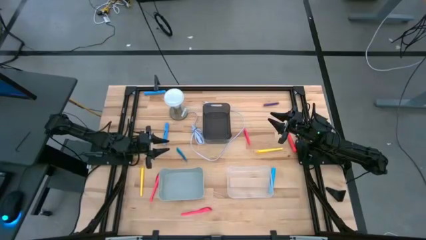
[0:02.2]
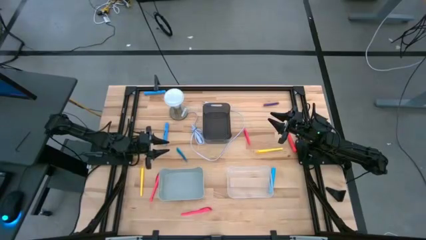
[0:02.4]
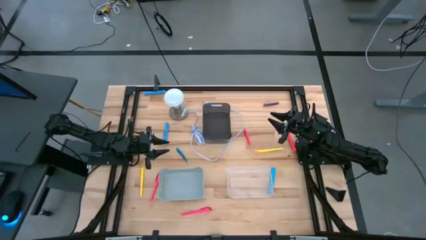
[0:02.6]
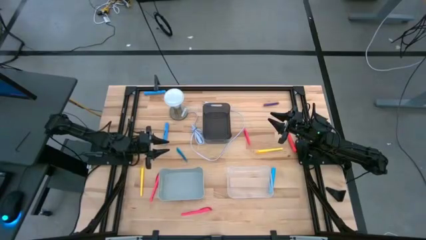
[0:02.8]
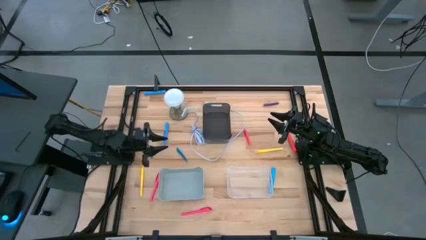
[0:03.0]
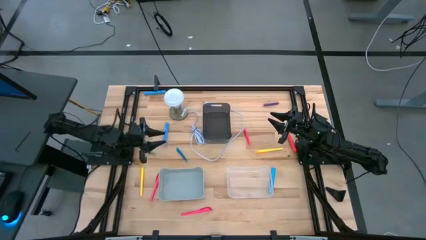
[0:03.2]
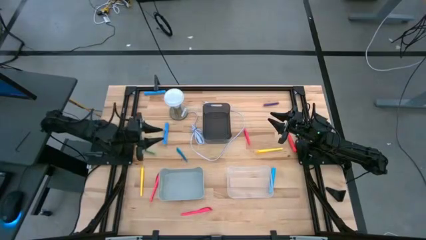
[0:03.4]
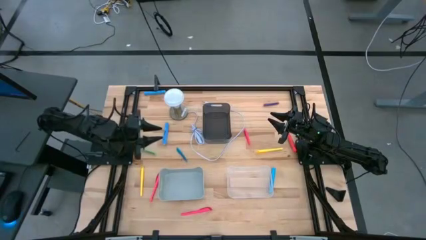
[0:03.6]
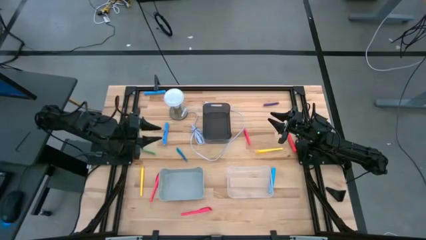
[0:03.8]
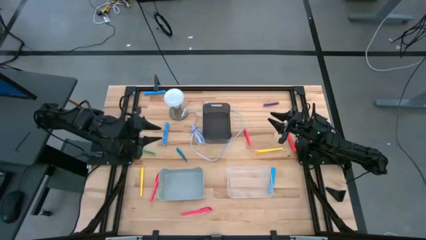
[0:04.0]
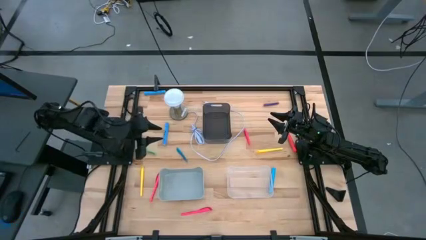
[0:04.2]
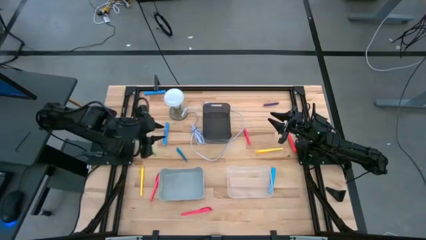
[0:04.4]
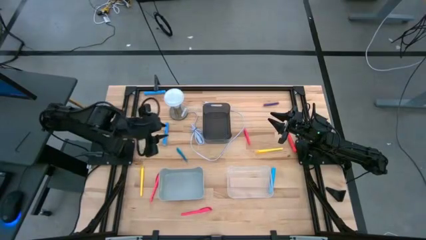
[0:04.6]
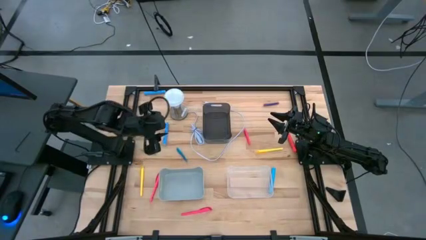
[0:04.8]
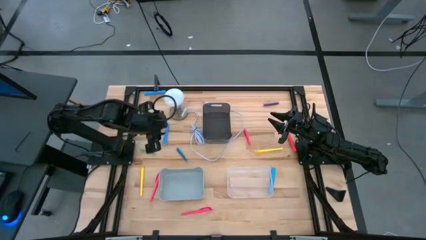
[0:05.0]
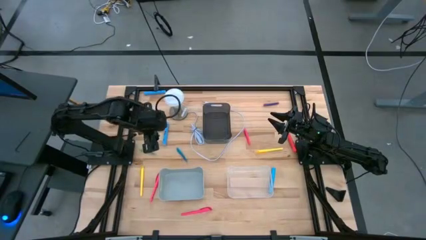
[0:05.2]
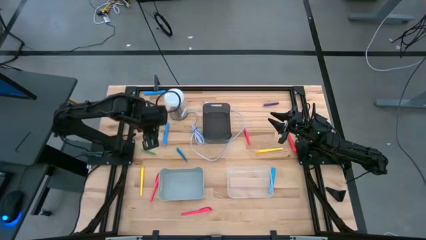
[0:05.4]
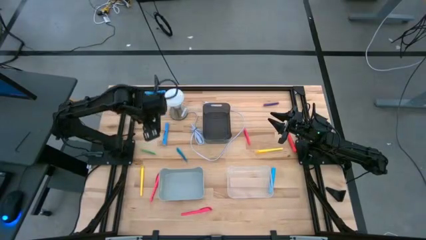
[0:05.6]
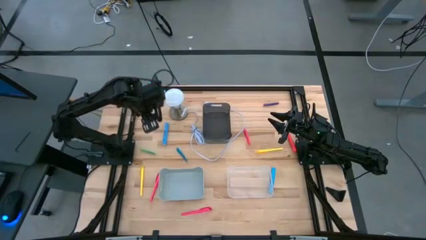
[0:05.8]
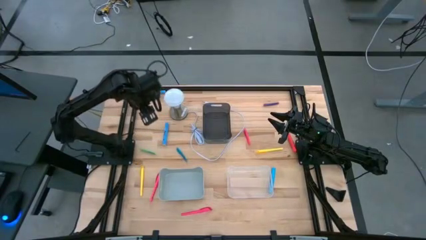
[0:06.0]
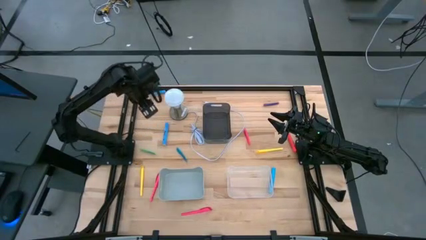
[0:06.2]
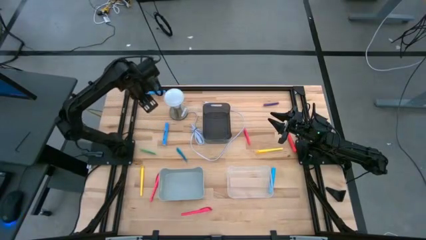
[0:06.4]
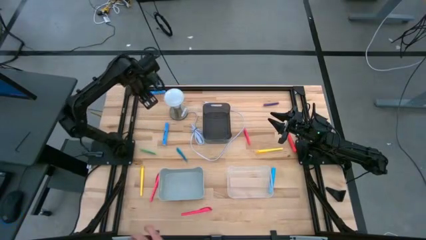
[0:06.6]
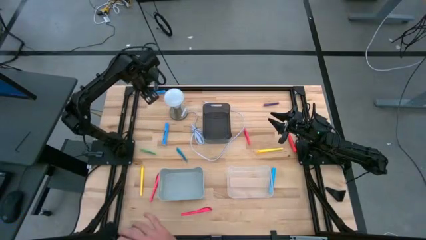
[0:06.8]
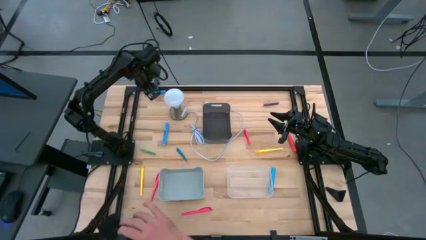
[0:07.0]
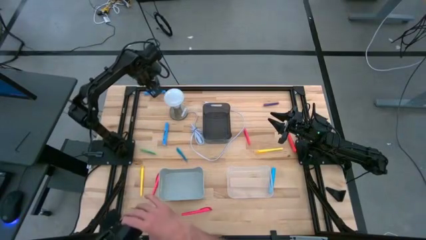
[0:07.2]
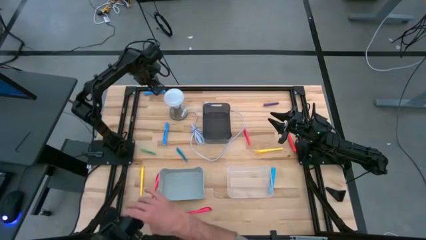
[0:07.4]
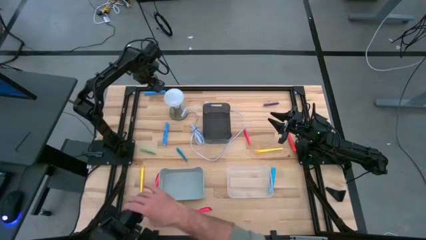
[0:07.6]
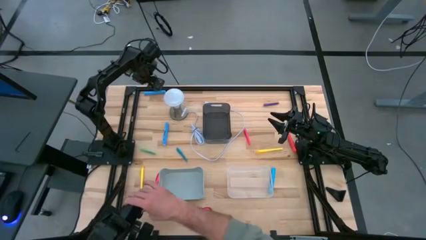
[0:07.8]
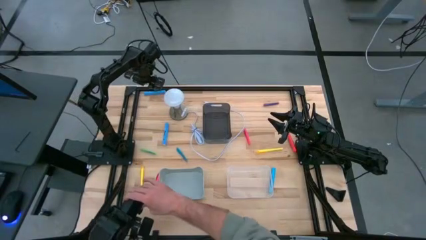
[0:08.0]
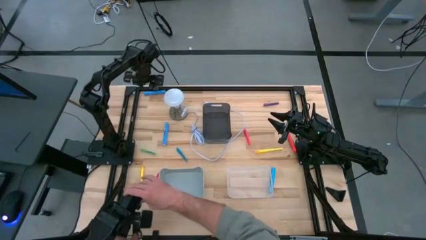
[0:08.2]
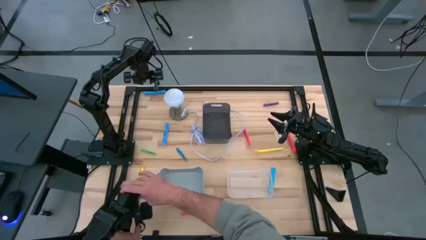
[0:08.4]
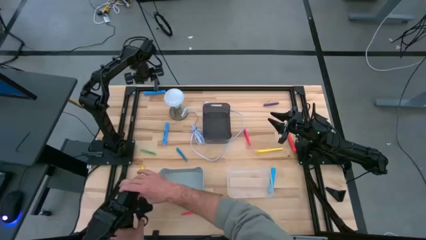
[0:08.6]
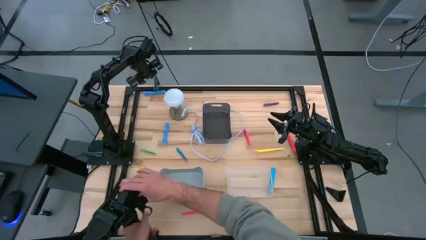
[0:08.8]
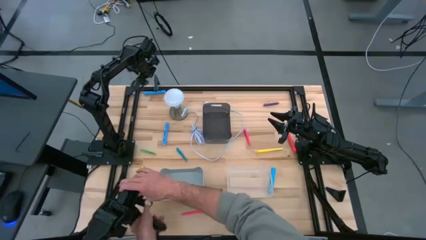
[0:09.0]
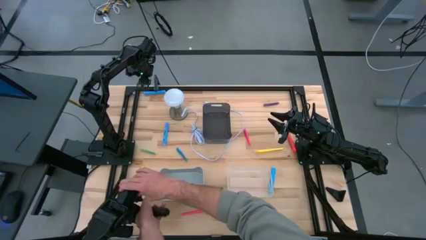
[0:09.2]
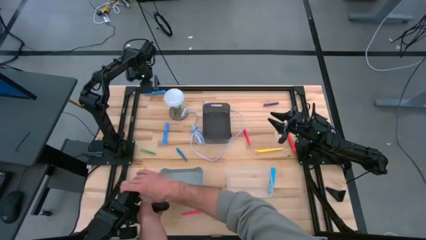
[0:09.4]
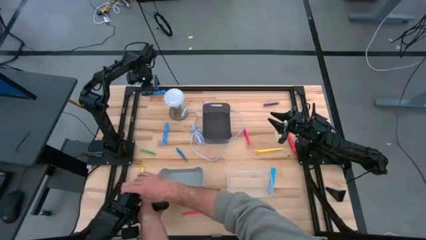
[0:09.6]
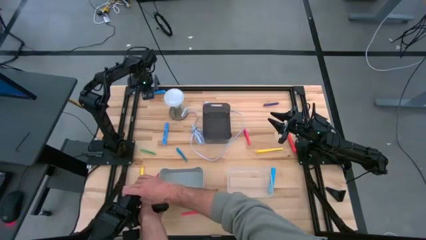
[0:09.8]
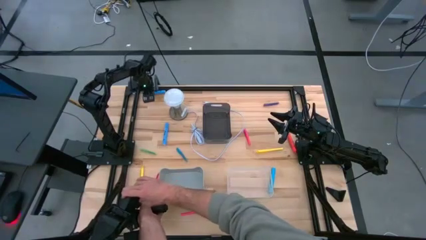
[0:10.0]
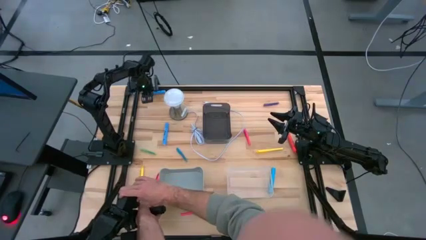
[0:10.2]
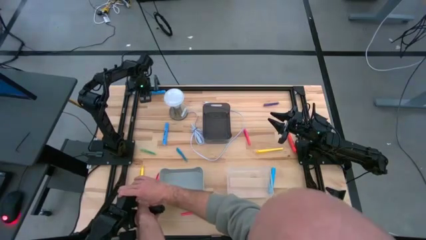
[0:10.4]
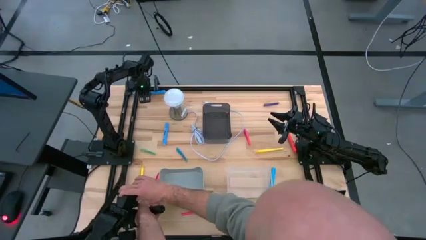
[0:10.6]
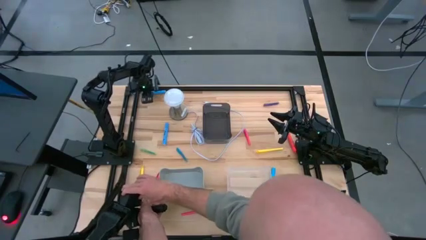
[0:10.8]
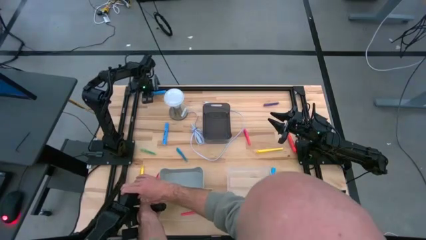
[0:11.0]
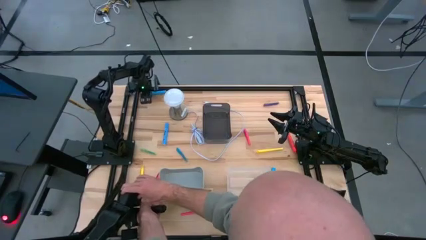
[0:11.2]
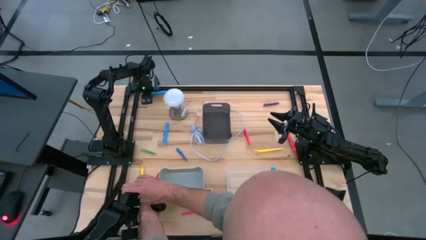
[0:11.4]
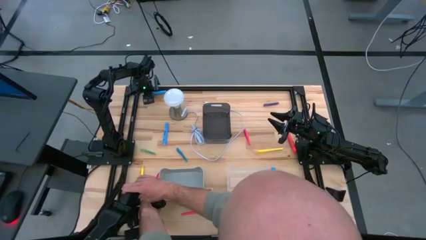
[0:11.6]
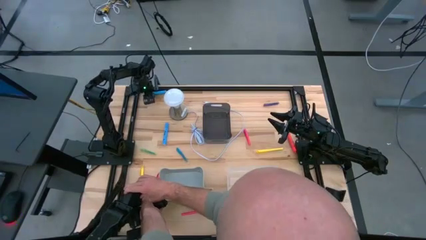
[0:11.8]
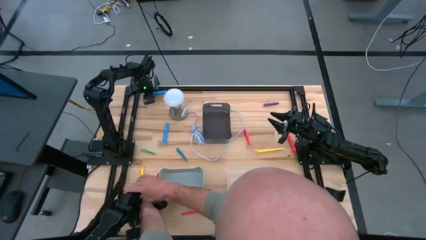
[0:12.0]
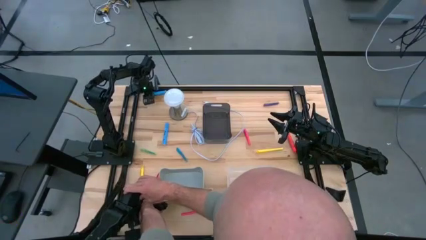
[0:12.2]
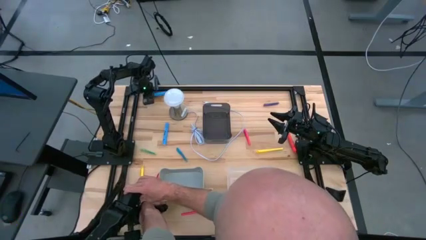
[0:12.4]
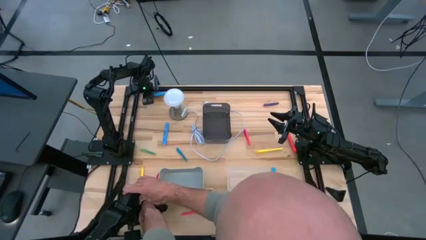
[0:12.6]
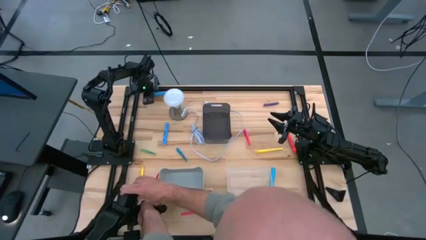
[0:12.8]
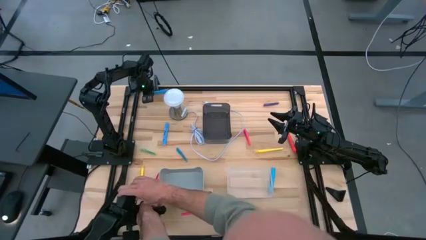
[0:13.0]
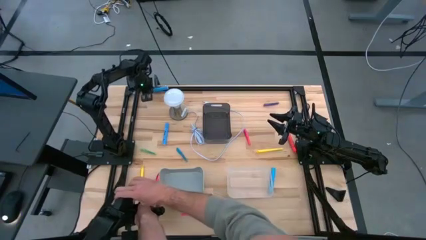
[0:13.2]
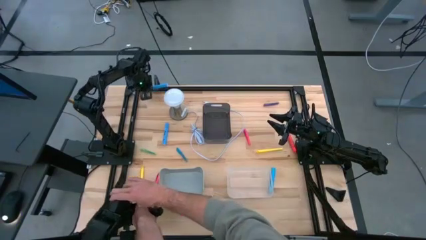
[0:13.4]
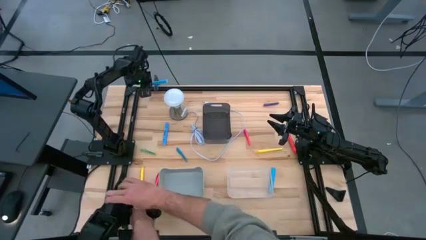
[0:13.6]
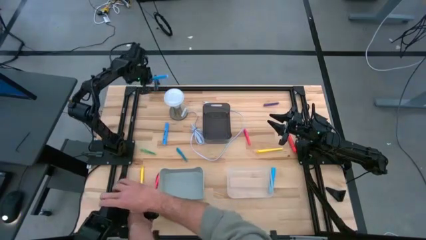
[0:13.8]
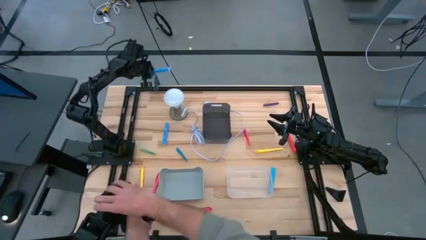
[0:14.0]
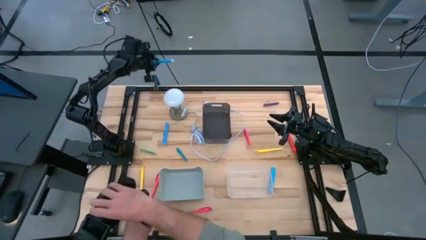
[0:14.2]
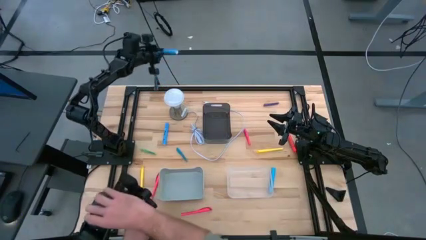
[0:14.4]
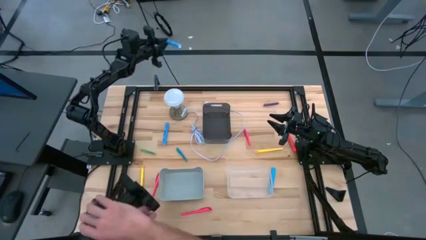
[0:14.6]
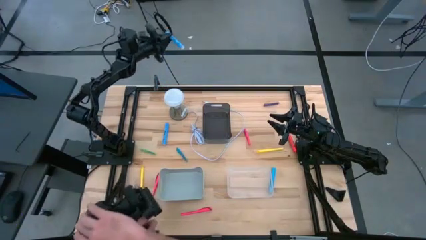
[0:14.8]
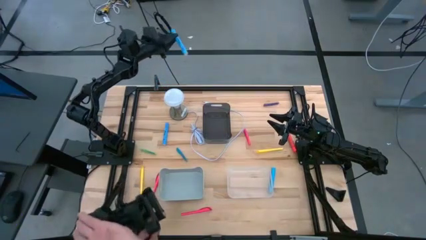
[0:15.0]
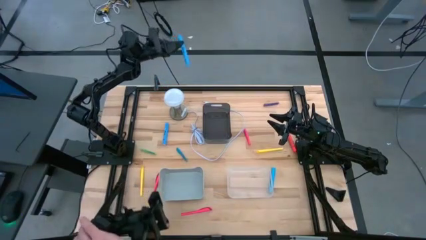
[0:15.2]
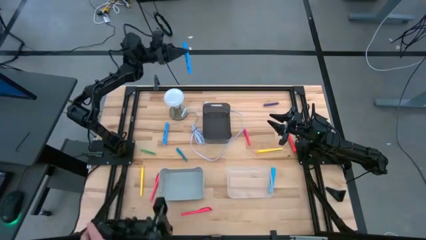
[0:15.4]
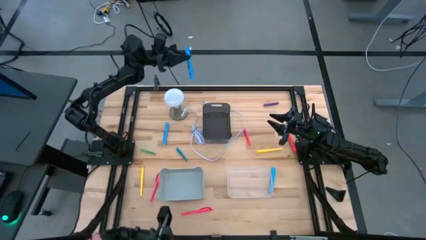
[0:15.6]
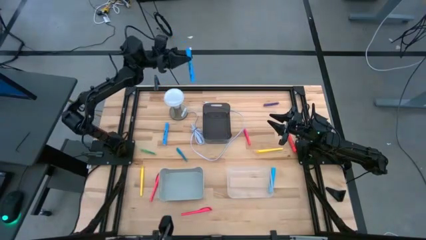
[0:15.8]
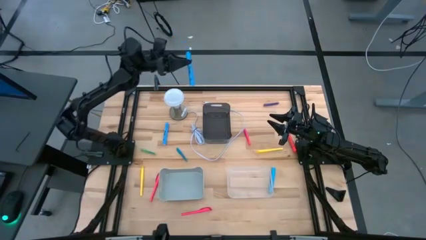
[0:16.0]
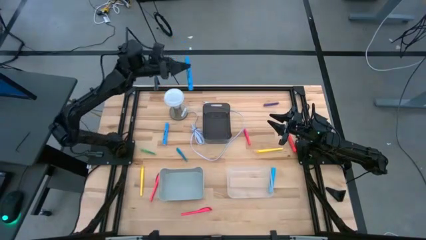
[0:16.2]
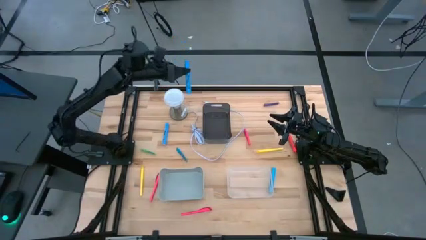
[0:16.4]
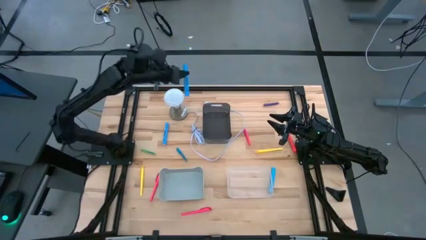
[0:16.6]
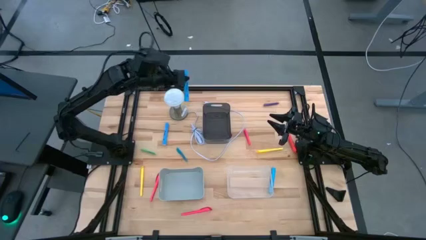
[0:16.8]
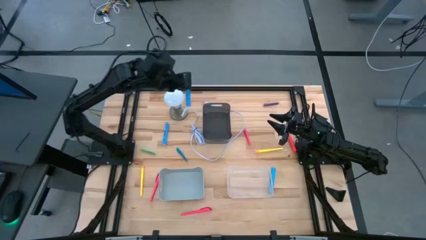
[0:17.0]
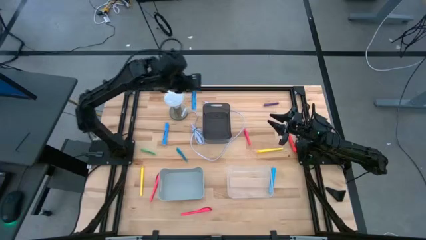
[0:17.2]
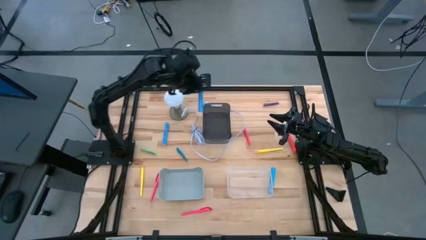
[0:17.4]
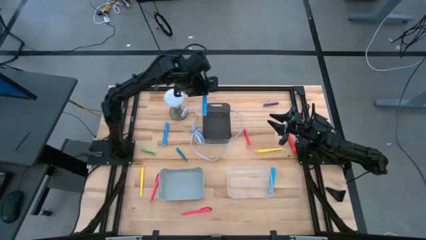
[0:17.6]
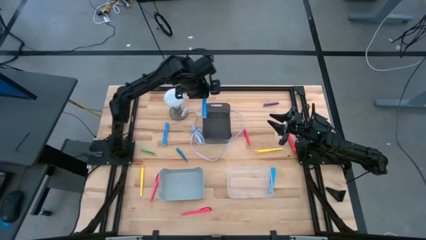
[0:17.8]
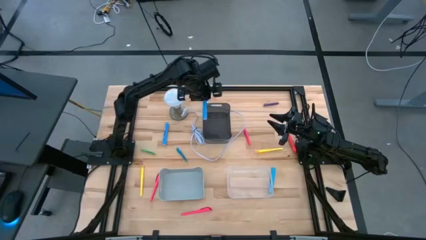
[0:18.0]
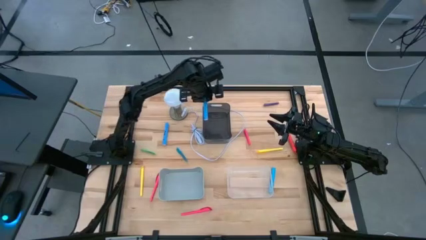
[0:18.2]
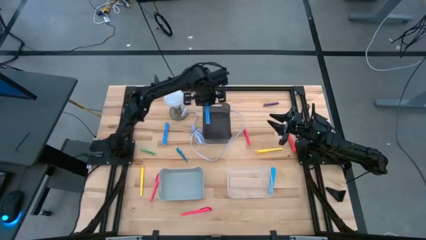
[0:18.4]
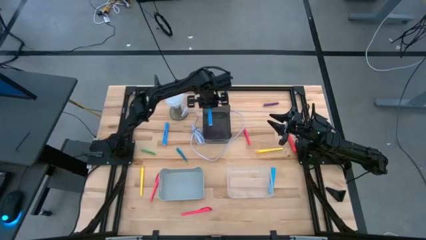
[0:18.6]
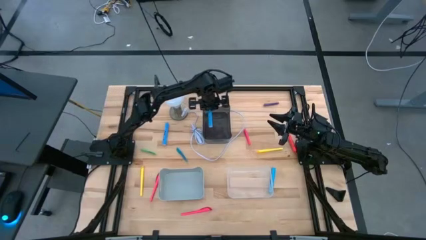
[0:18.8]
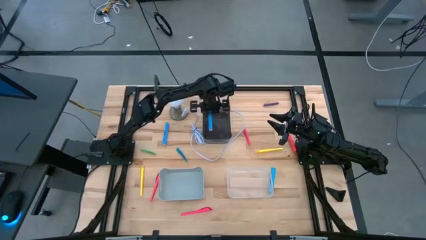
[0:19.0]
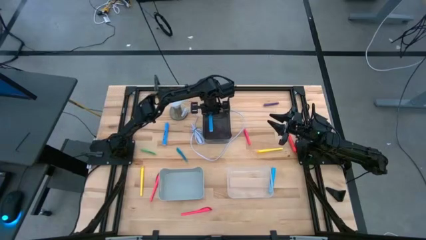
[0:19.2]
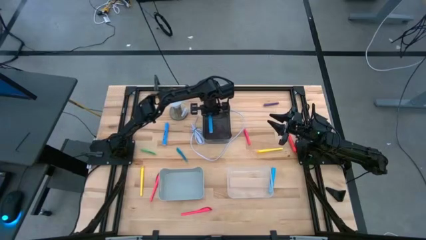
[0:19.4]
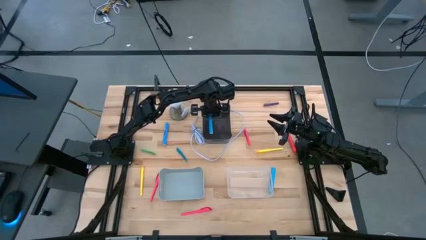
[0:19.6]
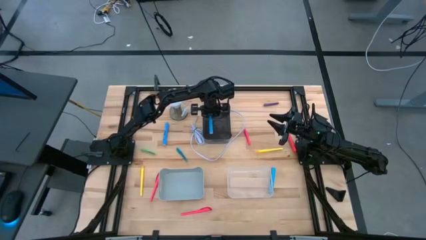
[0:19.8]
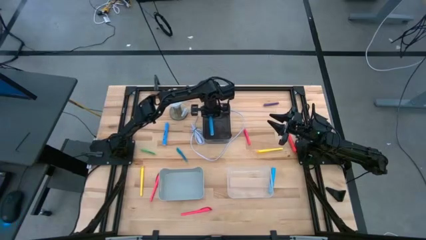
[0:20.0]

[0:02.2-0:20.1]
Task: Pick & Place Markers
Put the top left blue highlighter pen into the black bin
